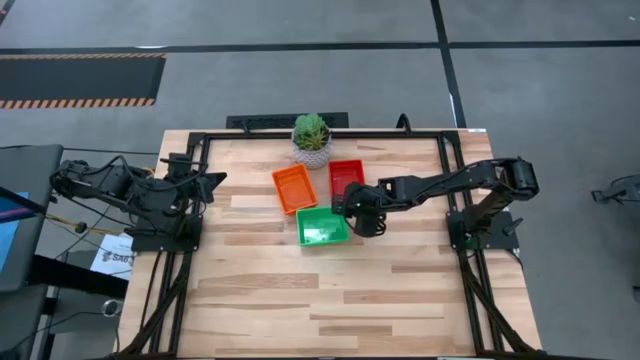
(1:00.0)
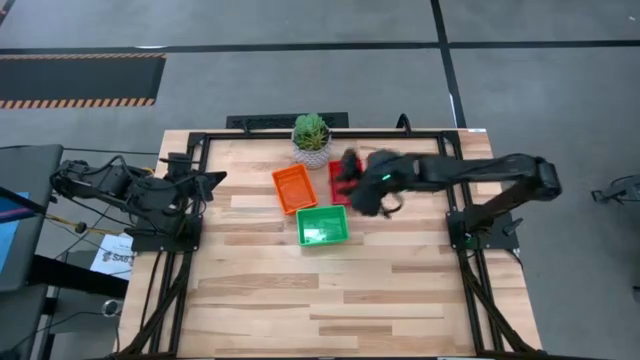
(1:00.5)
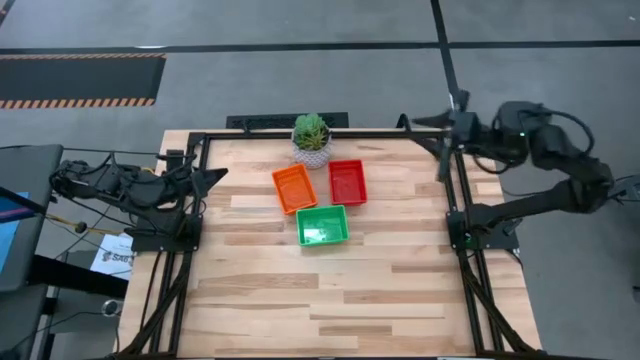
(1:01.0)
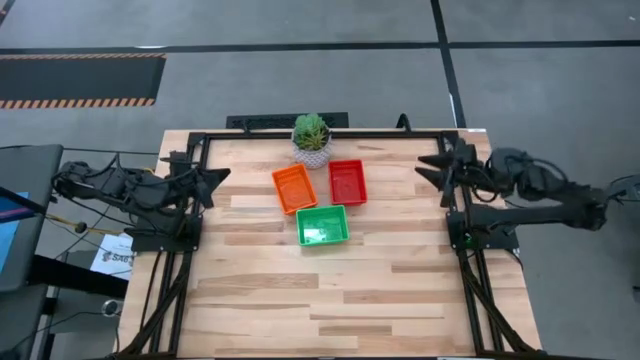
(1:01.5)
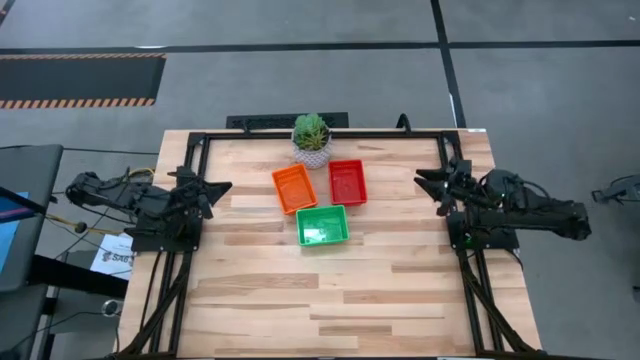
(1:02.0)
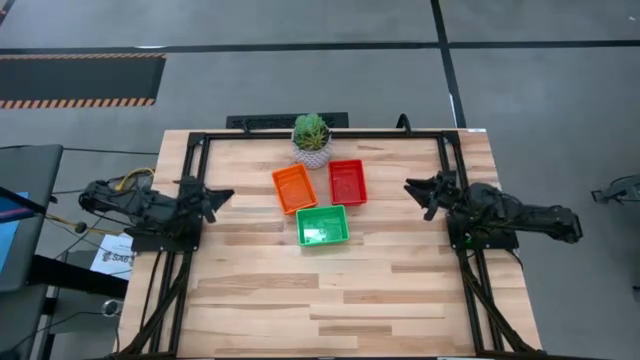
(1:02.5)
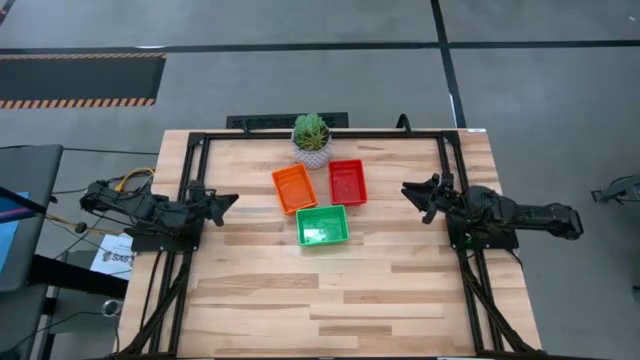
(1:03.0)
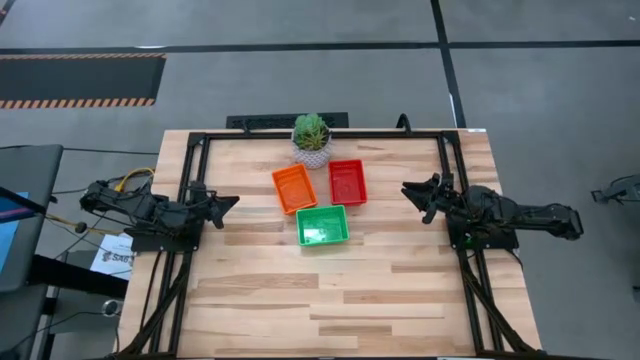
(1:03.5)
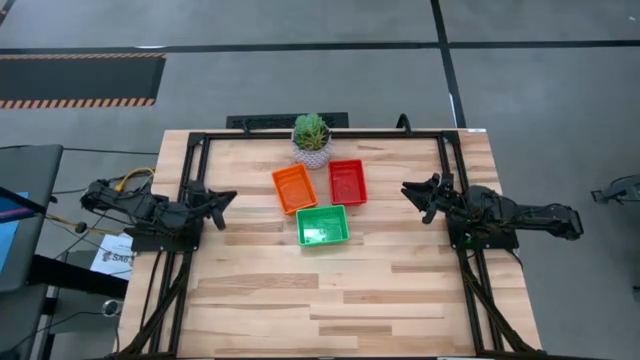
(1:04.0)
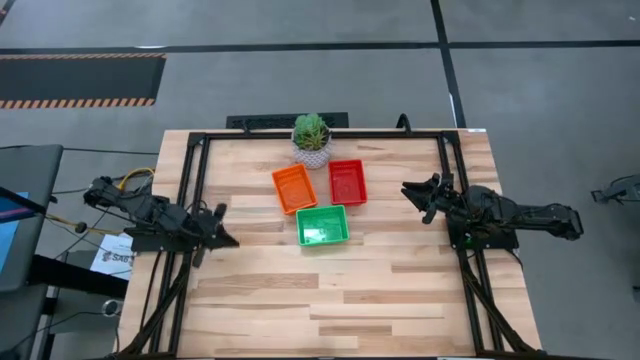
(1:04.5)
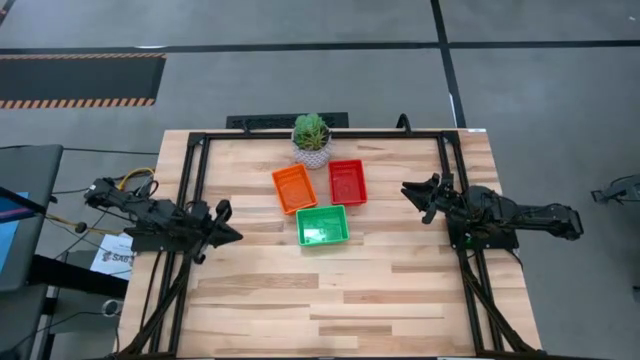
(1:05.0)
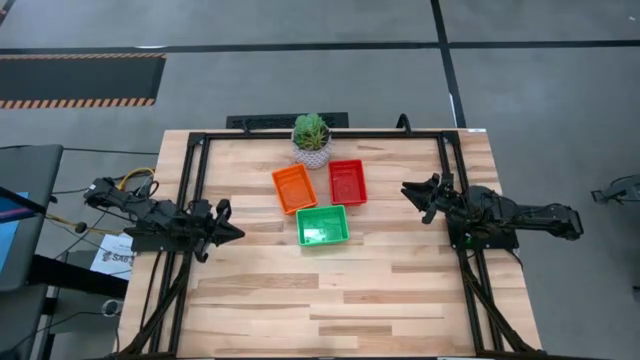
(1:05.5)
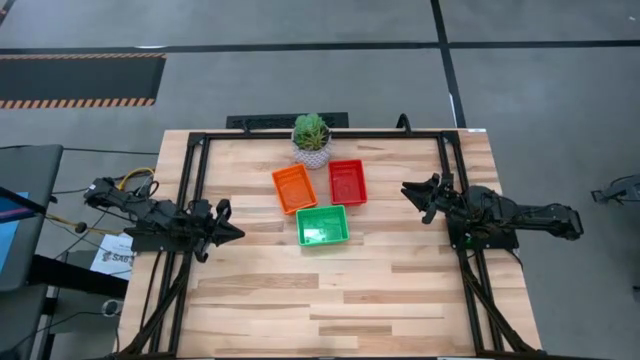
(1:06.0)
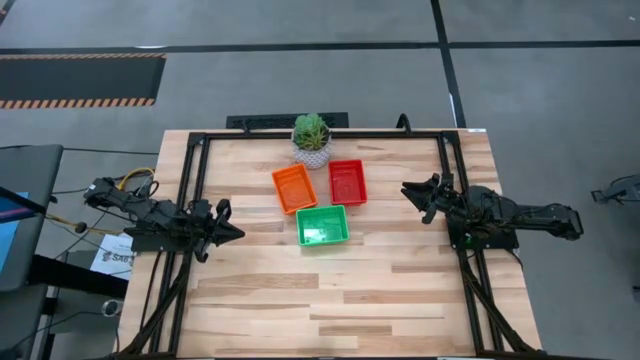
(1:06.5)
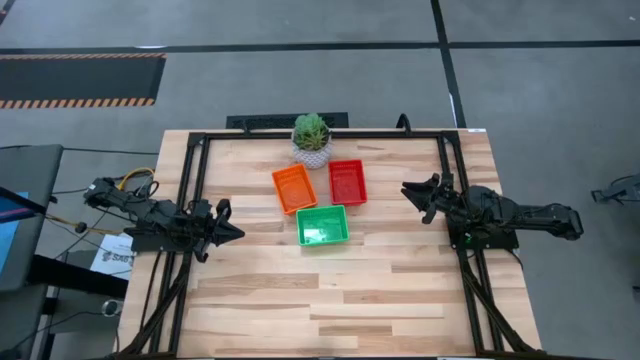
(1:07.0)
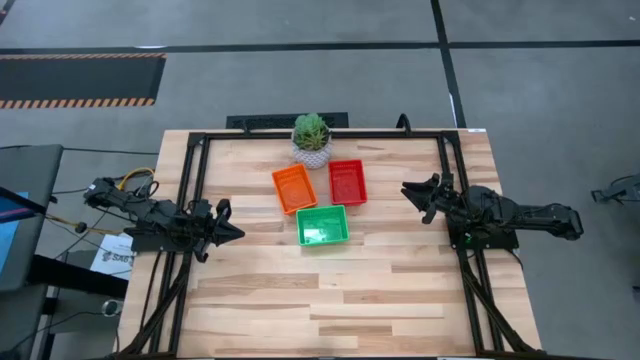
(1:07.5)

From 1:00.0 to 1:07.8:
Return to Home Position

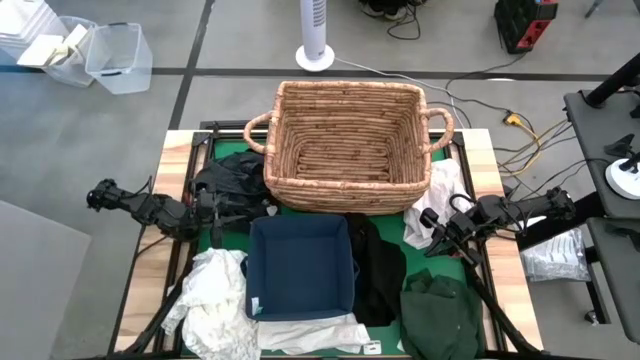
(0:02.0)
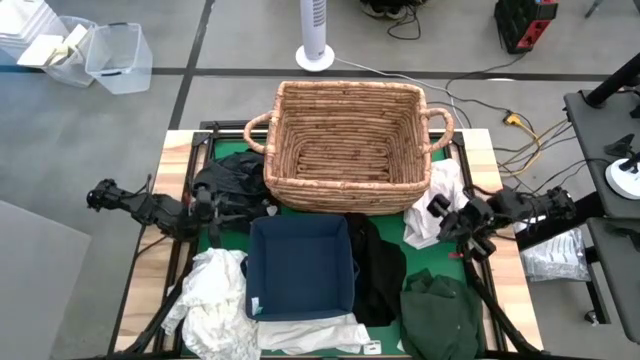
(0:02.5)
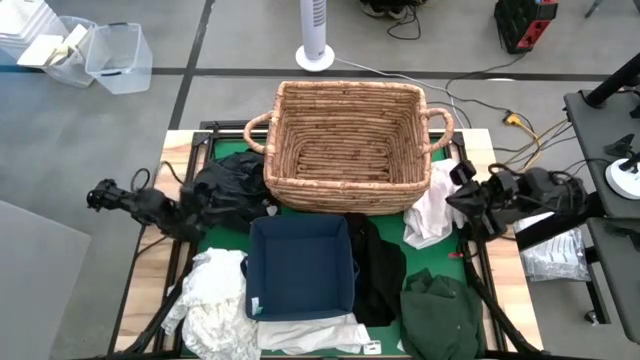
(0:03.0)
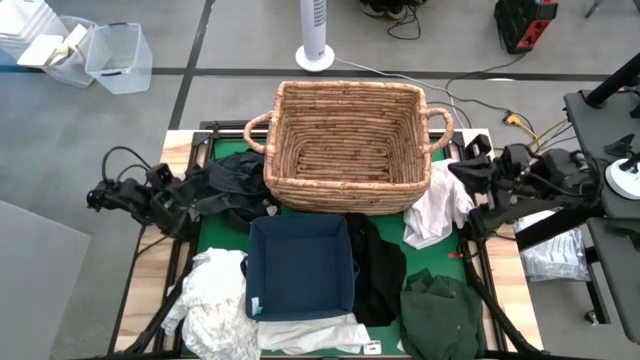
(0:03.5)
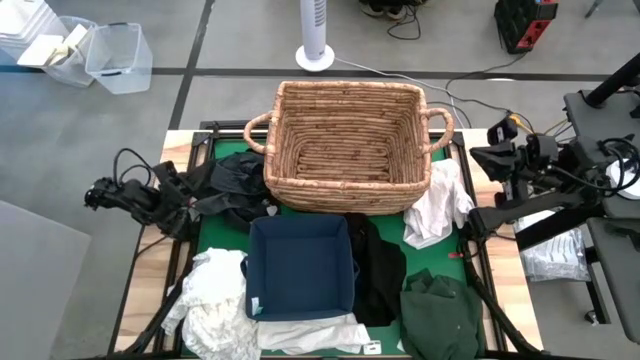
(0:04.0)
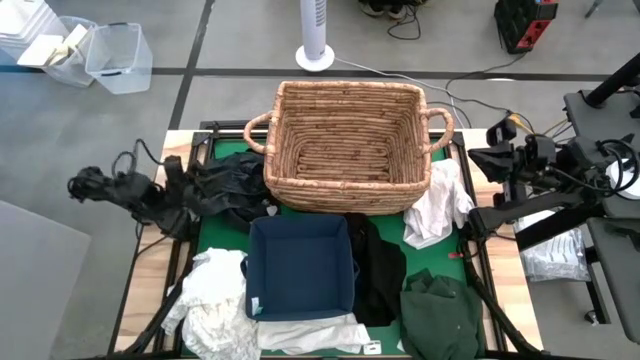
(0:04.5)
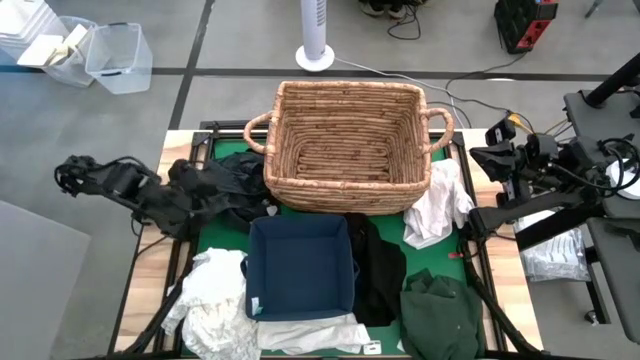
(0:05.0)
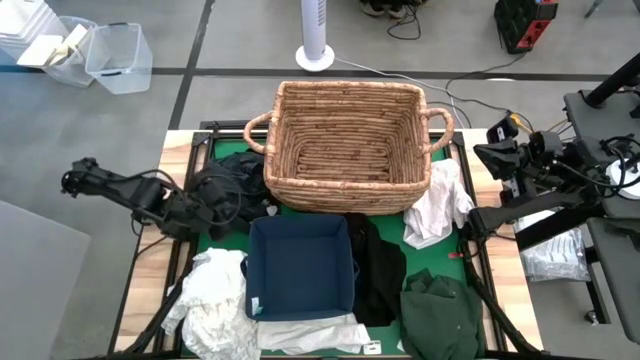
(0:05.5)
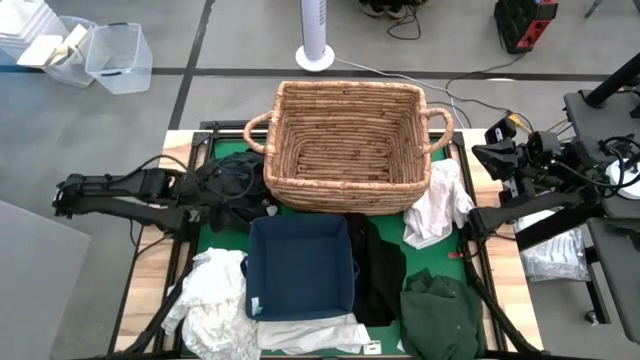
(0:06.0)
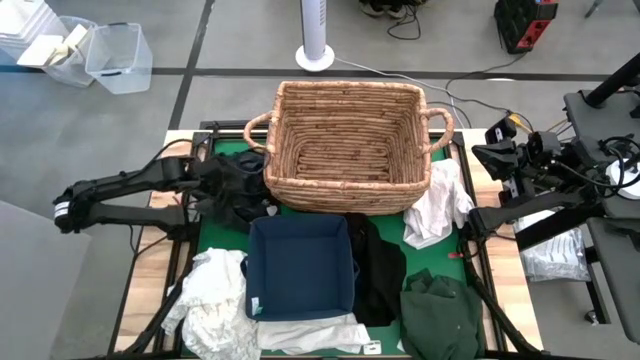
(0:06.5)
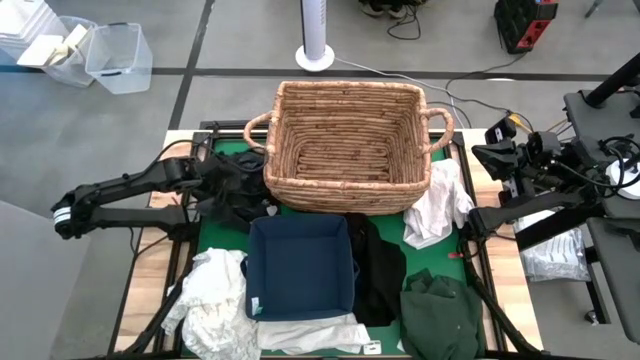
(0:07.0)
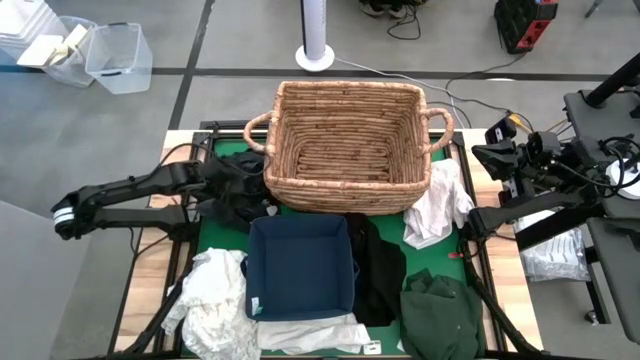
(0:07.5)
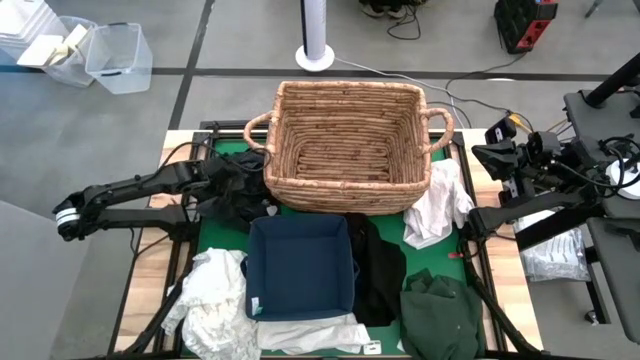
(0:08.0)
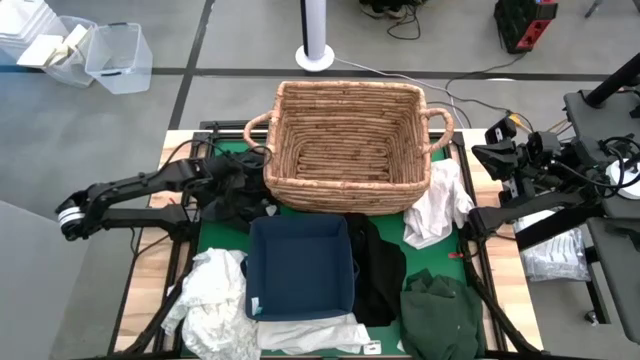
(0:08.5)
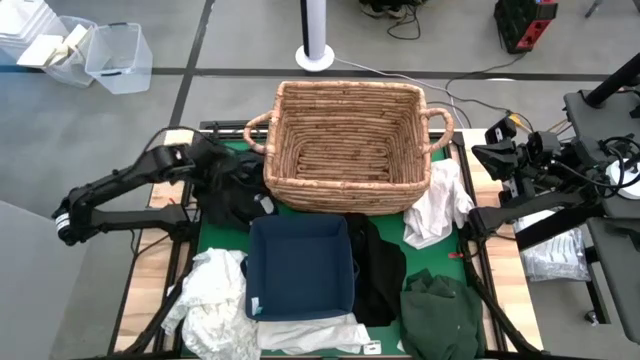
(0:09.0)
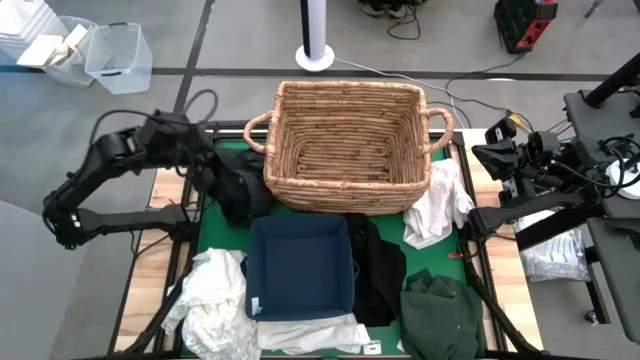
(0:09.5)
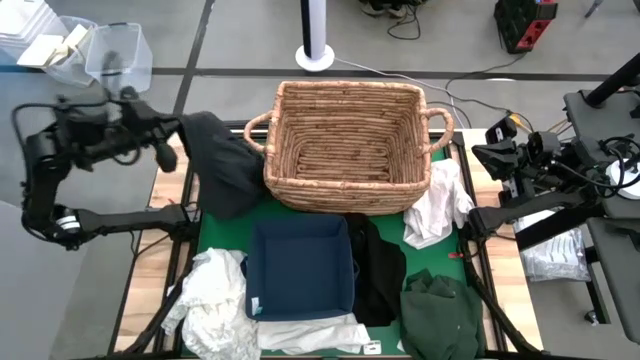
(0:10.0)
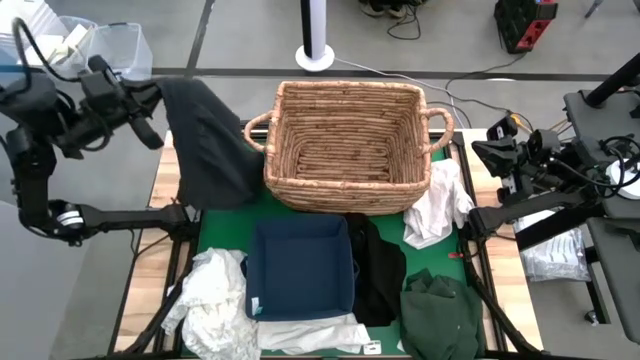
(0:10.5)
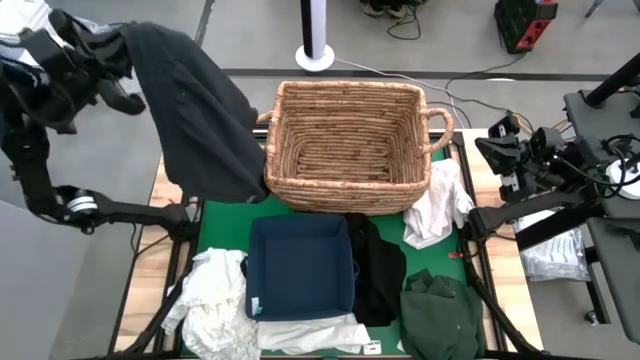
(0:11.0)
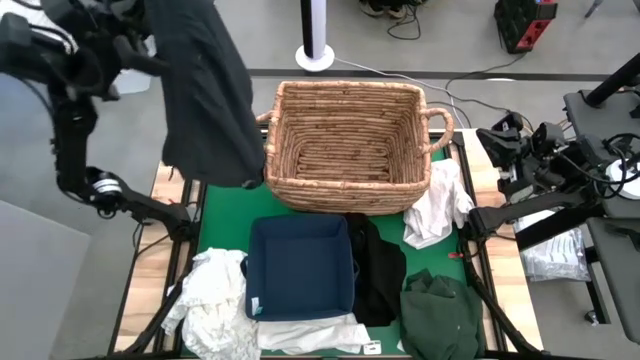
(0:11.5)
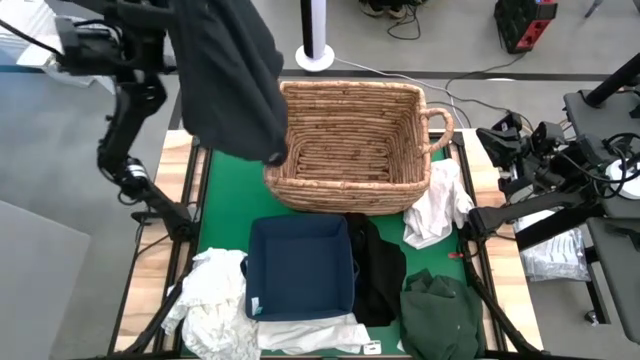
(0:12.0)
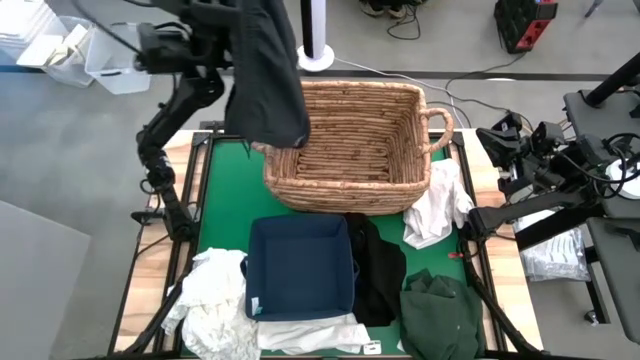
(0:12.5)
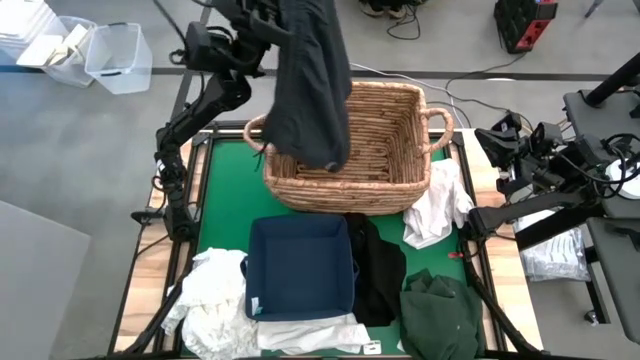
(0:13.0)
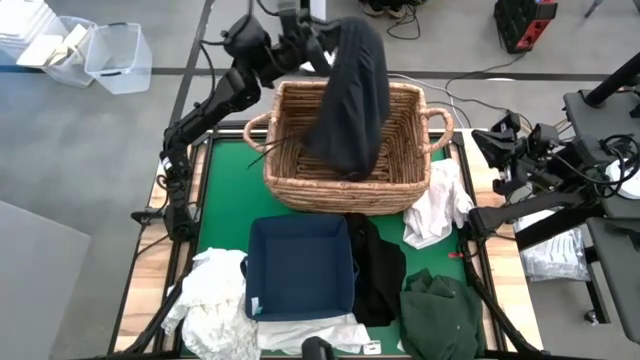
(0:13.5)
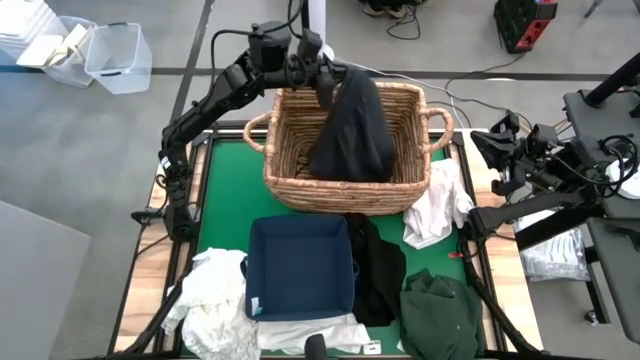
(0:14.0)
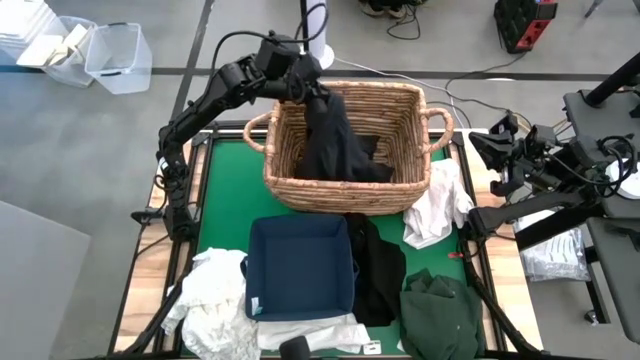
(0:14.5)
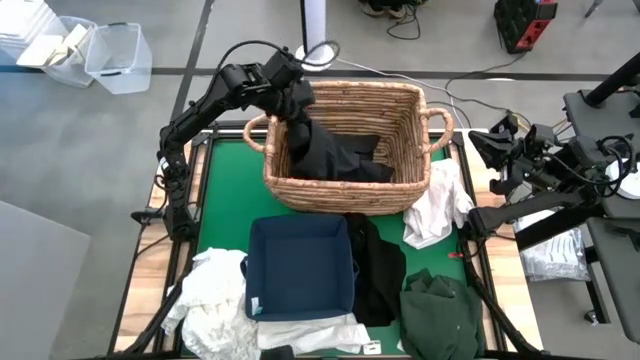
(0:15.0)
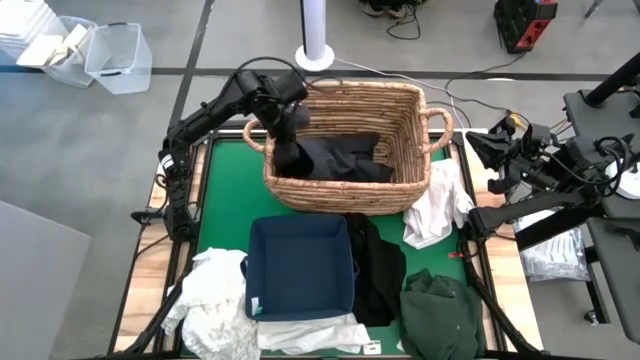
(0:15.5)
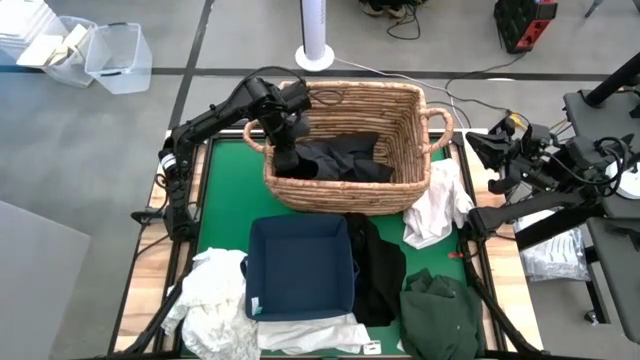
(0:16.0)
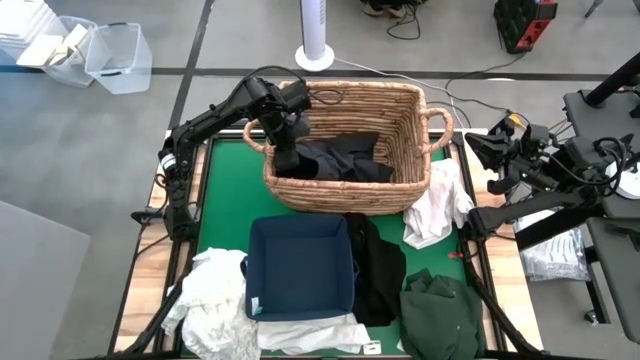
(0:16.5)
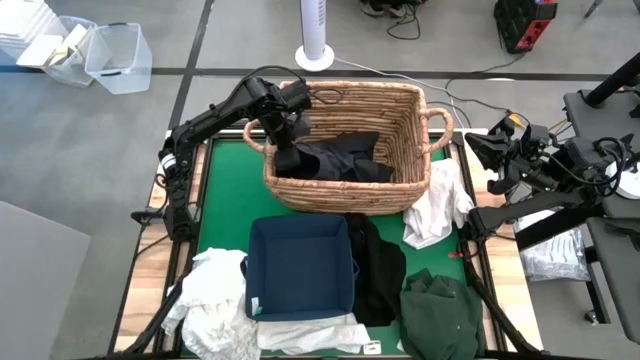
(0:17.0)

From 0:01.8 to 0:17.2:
Put the black shorts into the brown laundry basket
